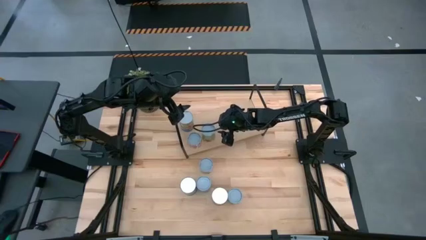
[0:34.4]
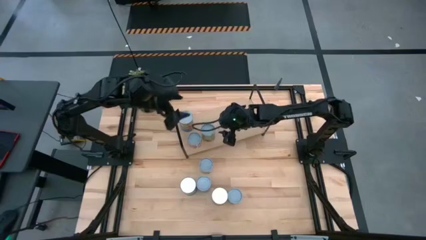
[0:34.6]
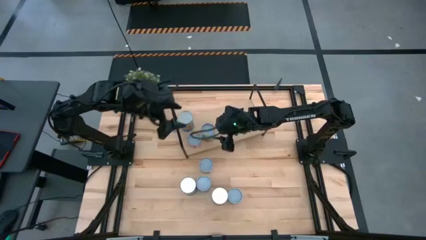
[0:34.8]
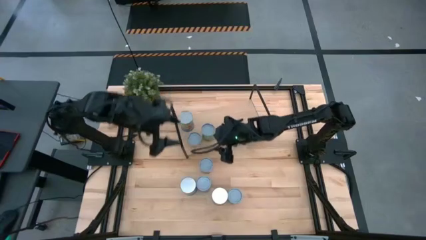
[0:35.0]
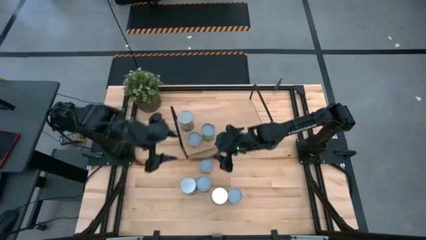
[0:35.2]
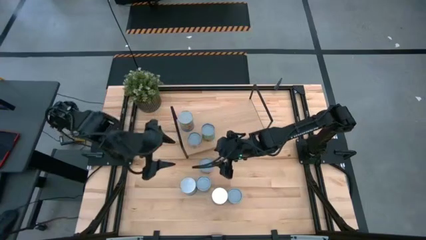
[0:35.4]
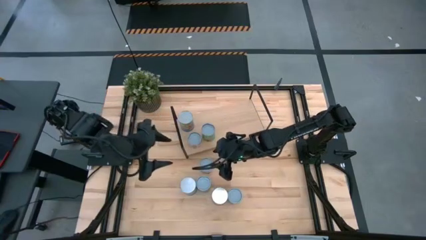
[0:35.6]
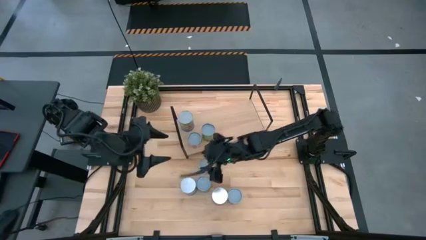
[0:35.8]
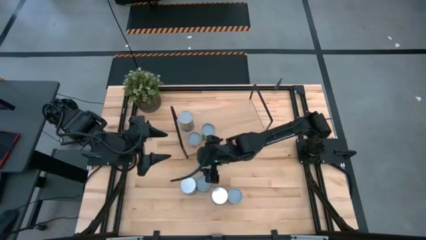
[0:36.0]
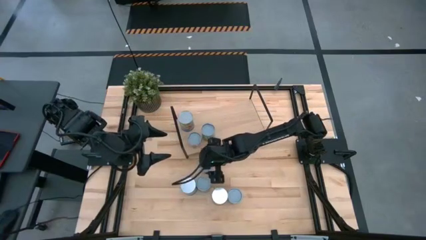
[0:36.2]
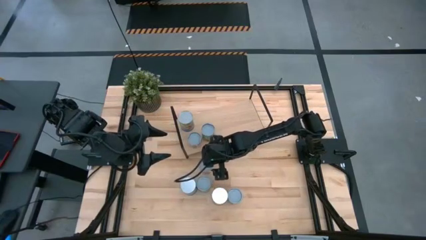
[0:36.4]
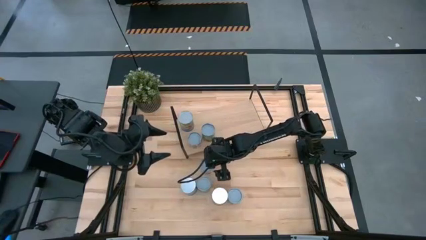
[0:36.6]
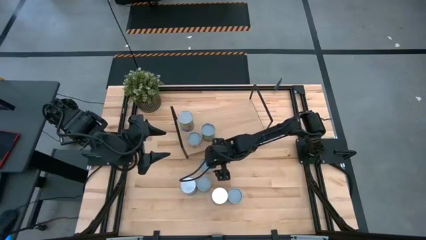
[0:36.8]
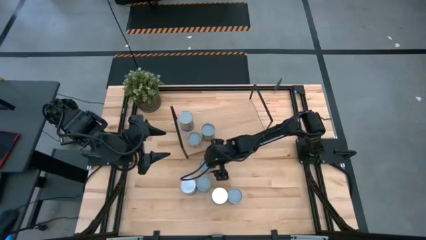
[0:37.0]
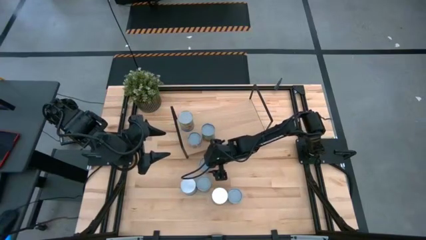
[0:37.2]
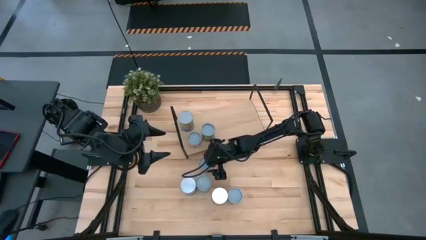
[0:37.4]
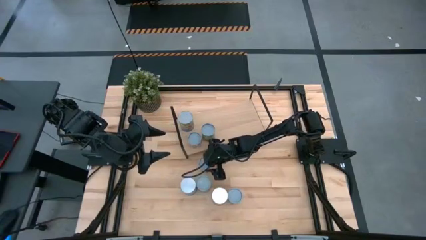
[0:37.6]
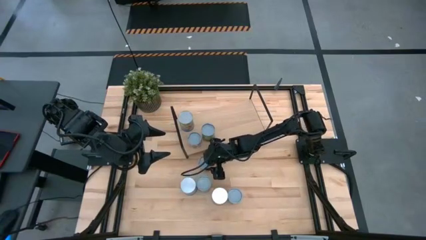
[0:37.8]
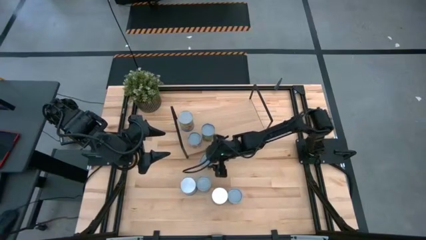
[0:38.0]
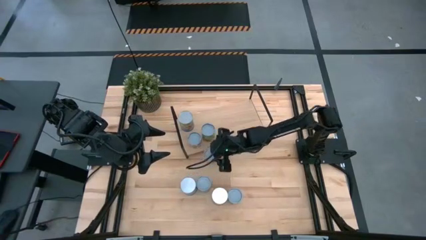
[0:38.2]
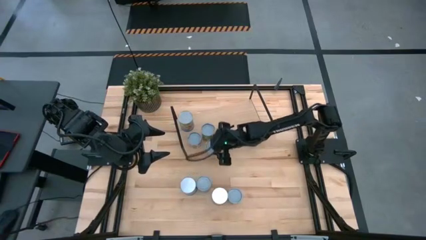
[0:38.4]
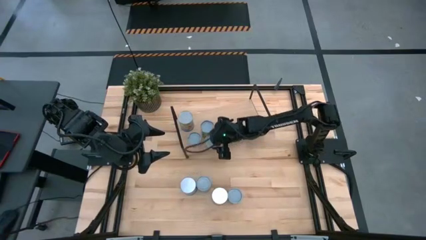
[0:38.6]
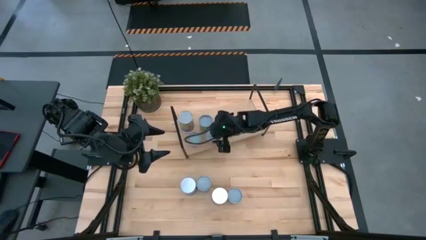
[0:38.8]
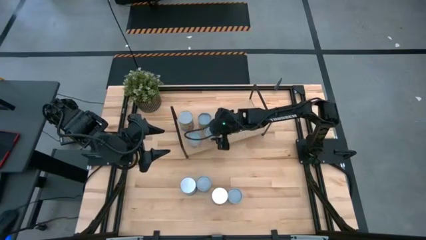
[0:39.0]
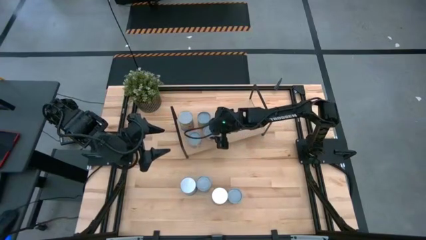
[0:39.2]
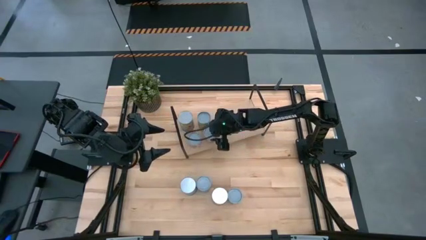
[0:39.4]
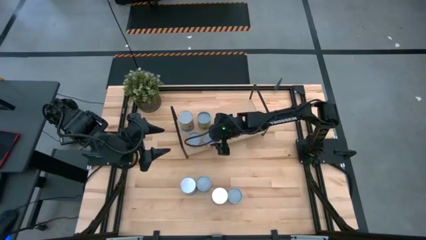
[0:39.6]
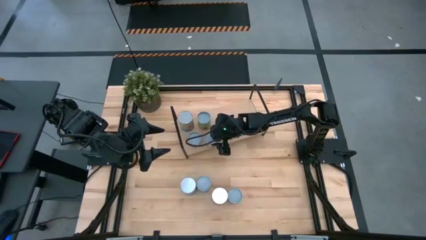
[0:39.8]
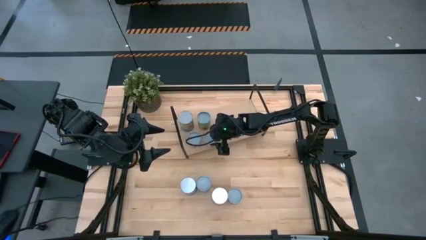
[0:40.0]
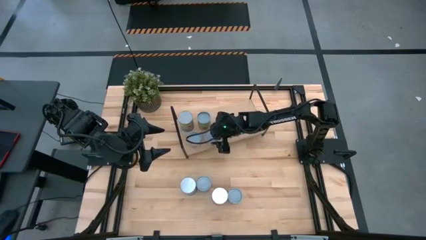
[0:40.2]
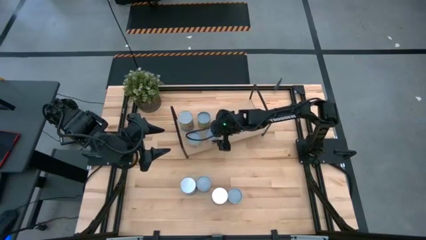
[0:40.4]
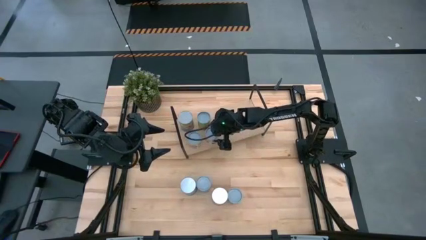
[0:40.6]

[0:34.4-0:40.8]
Task: Pick and place cans onto a shelf
Put the canned meatballs on the shelf

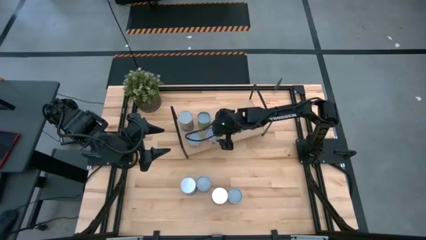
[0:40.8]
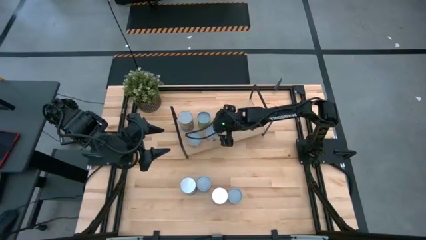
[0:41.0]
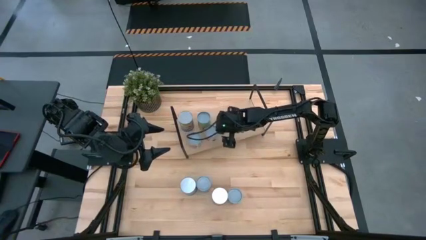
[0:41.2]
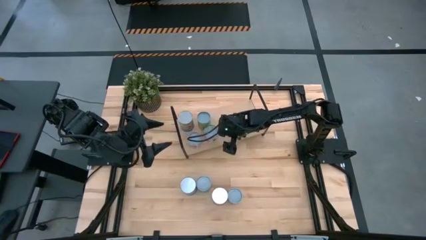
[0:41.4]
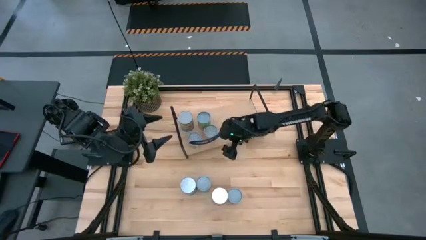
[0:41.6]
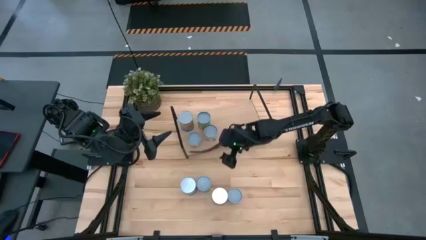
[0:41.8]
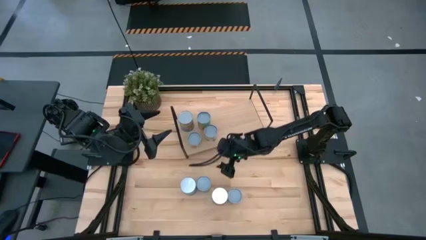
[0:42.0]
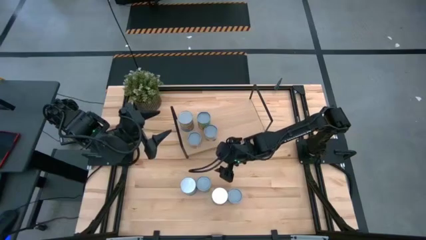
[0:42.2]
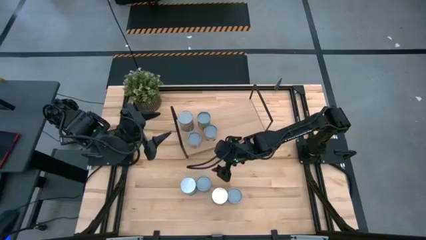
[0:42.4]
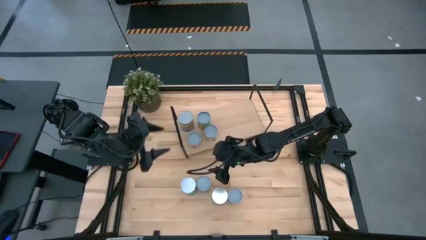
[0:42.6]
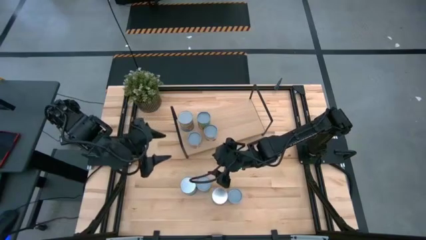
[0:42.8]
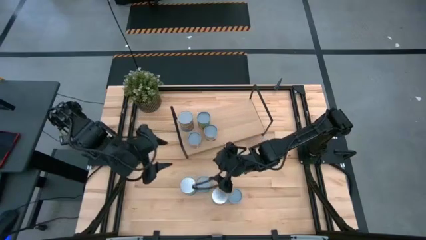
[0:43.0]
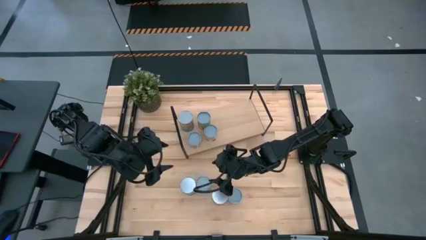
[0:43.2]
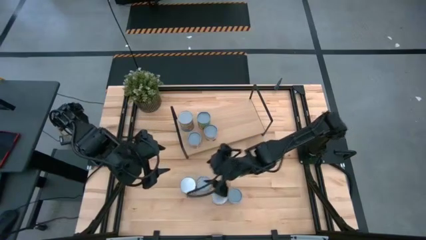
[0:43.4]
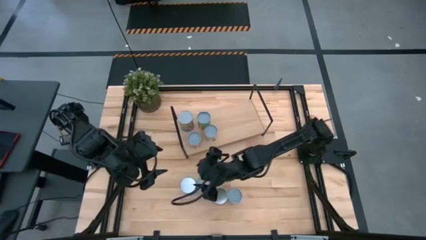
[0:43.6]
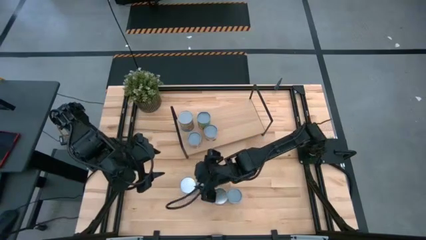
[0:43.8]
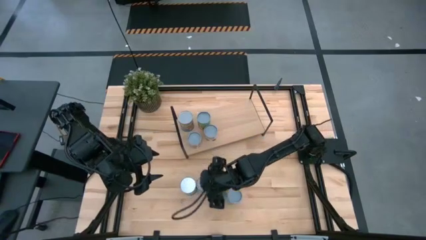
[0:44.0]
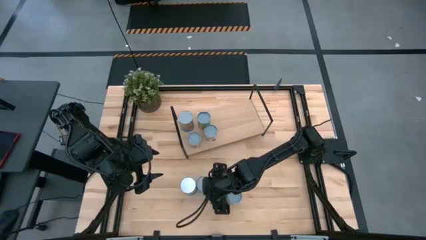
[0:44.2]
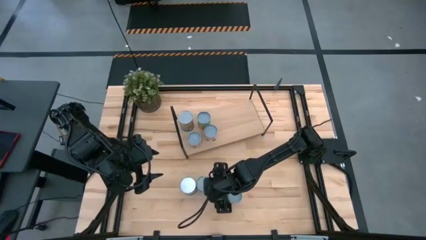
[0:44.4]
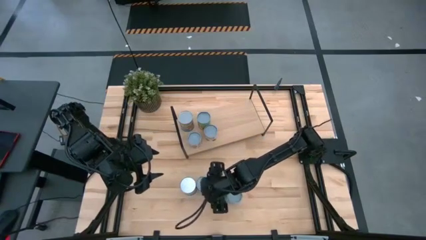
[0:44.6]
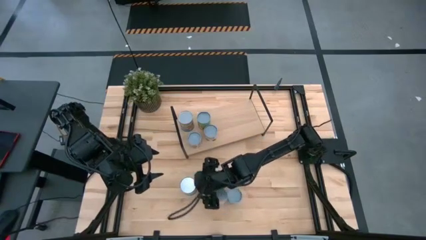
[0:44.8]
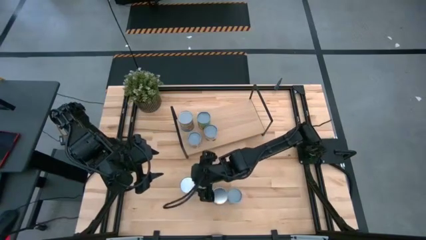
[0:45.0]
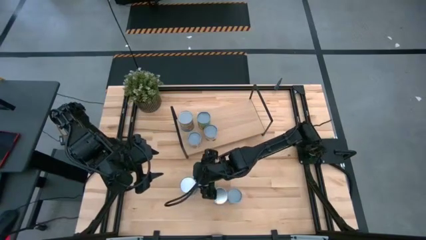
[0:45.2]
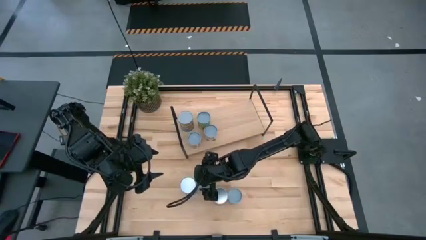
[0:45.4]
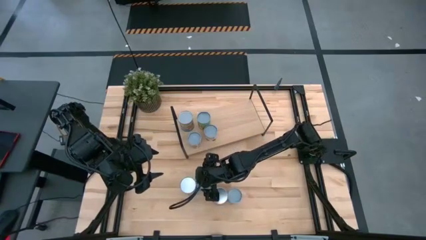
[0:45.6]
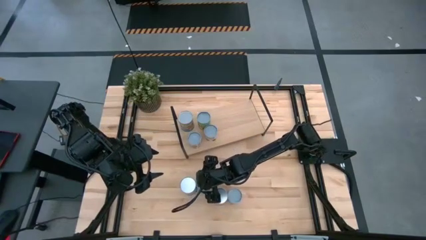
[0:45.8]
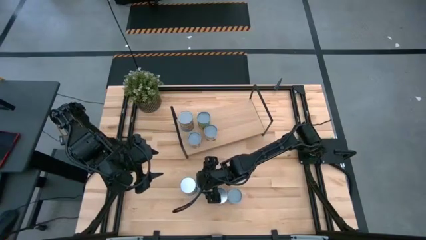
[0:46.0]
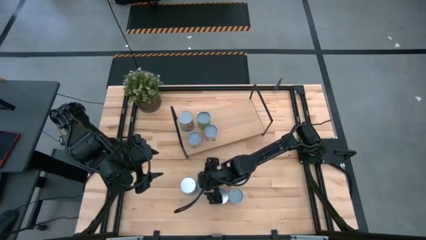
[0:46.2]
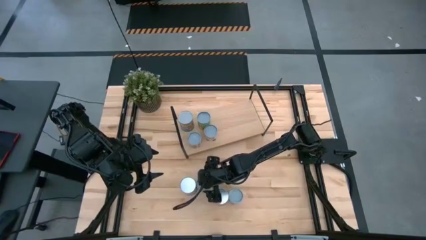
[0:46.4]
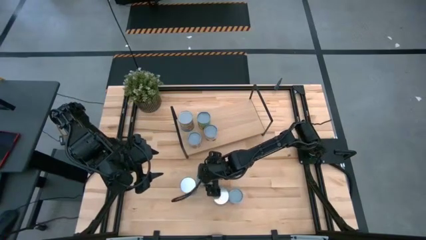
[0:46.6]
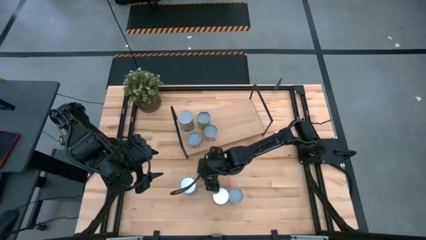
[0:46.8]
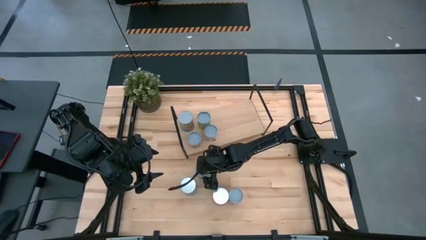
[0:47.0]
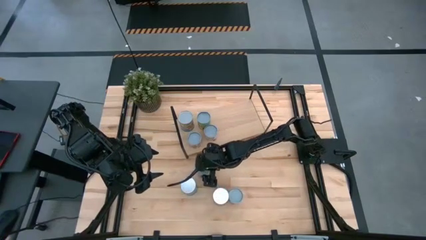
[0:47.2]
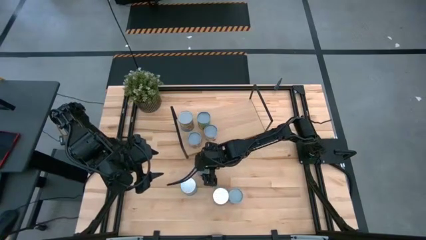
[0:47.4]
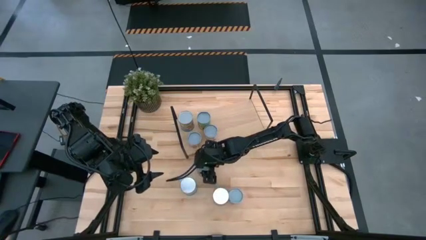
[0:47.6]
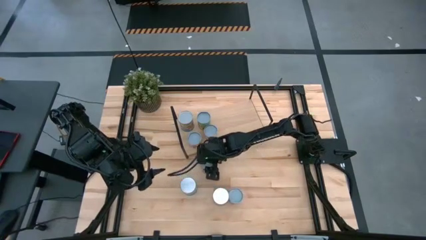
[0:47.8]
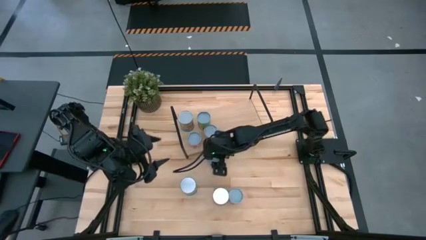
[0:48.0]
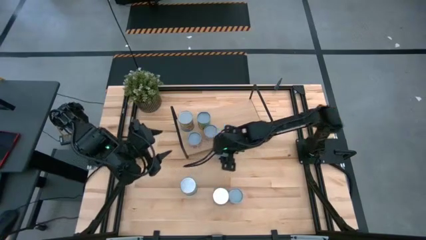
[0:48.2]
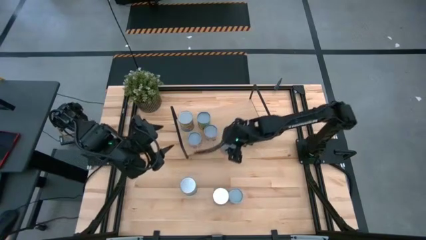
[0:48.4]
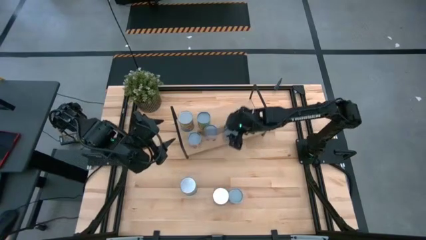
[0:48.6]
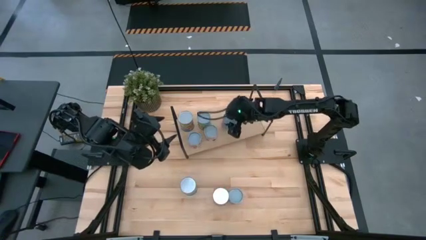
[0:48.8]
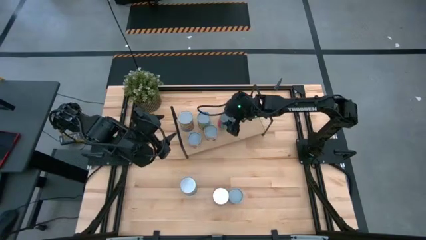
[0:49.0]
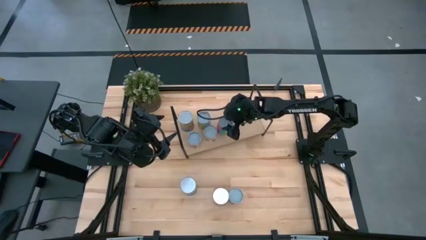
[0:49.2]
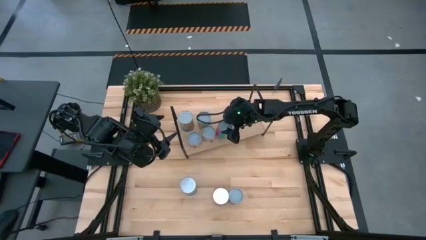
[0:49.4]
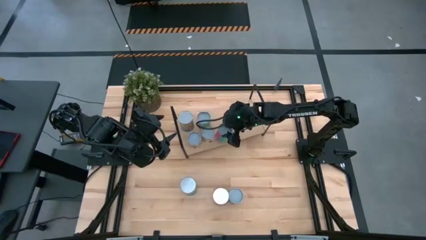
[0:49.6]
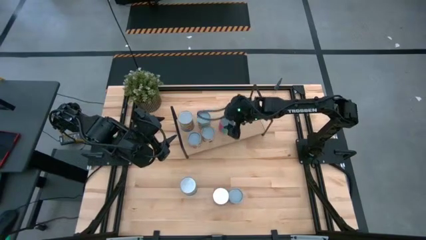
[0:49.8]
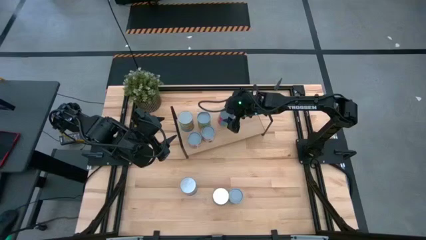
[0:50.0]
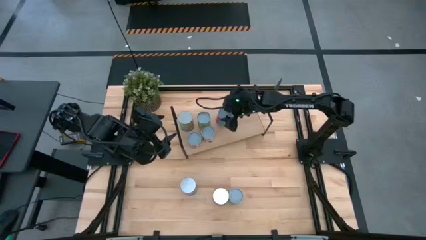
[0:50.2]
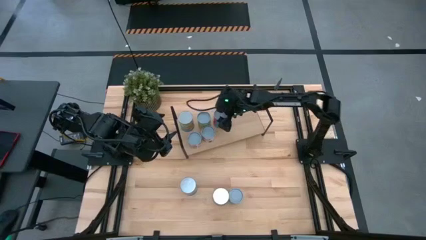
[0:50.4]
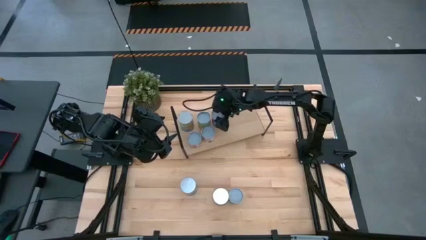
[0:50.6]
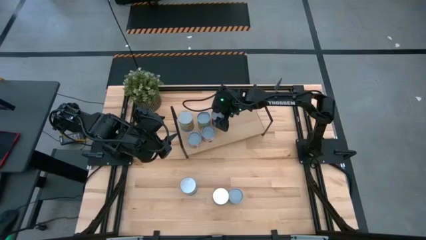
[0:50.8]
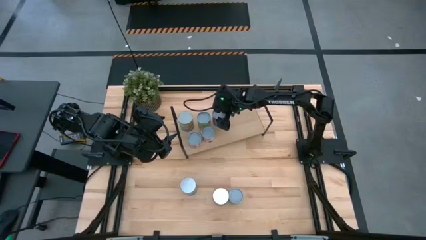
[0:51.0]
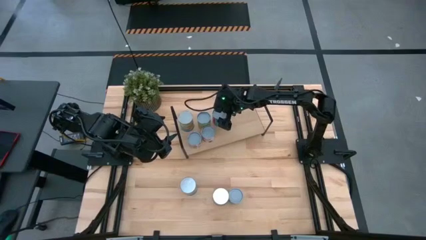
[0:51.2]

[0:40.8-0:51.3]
Put the canned chicken soup on the shelf
